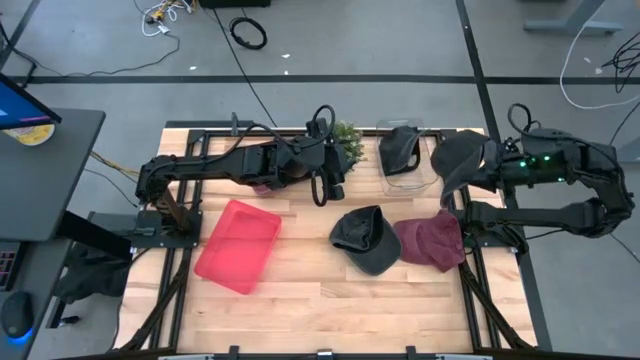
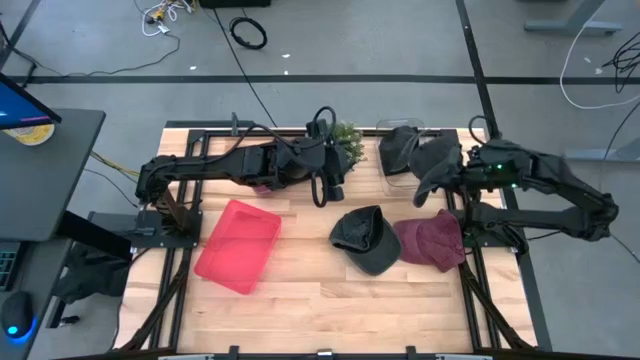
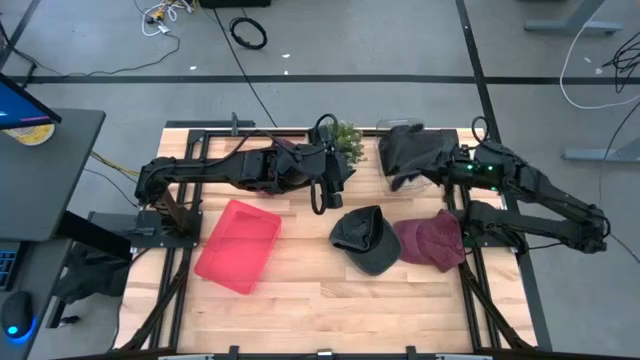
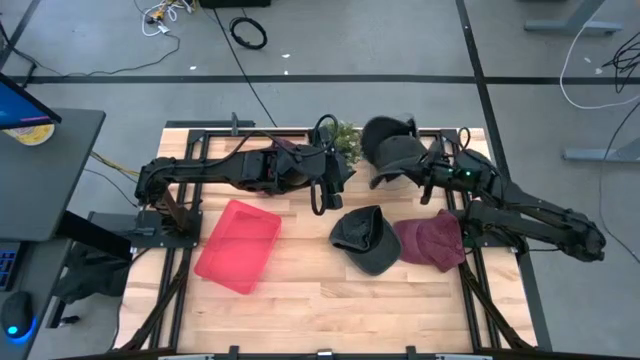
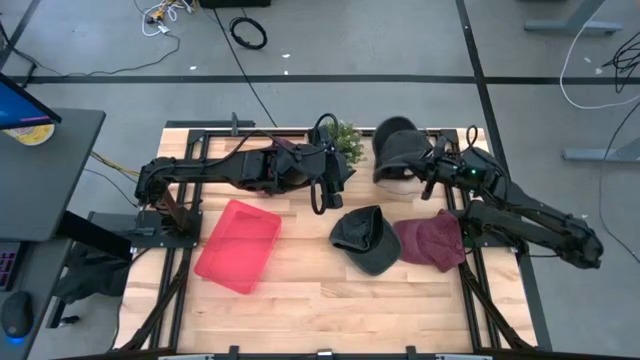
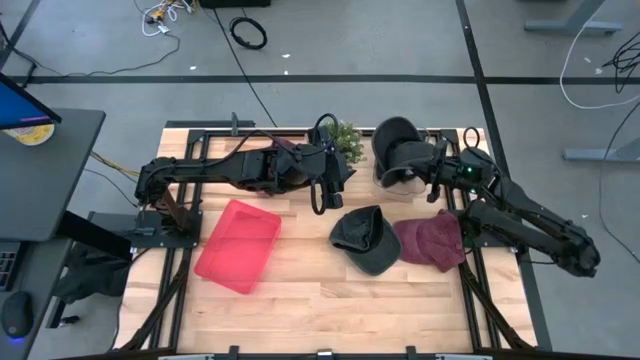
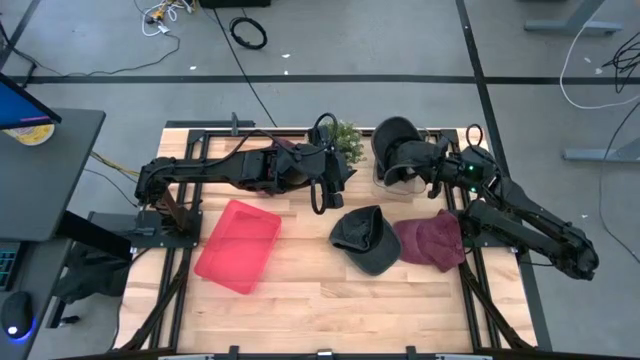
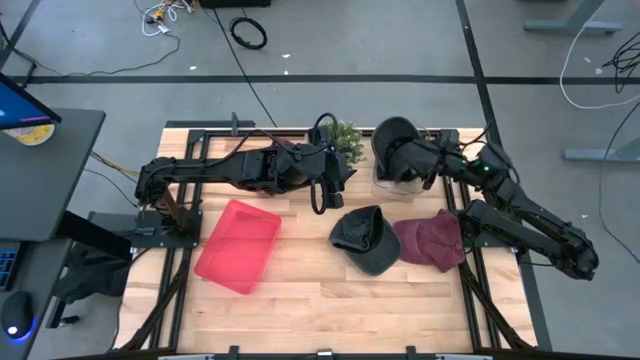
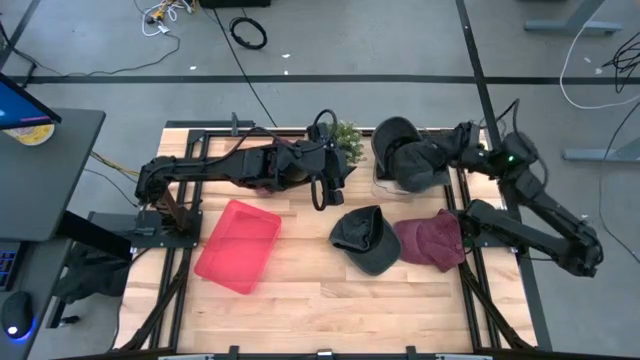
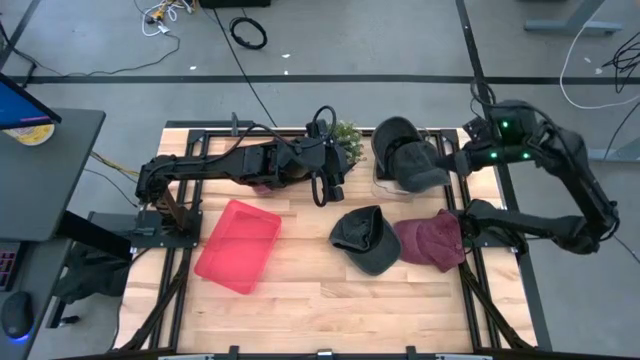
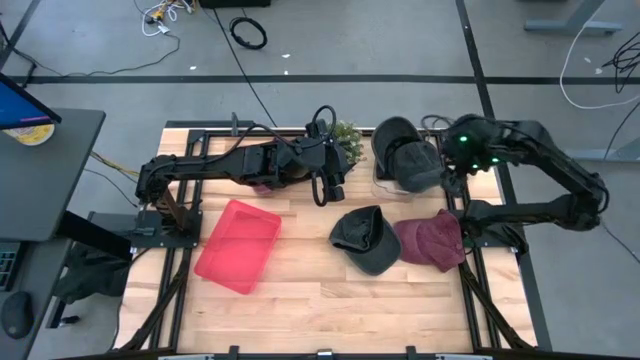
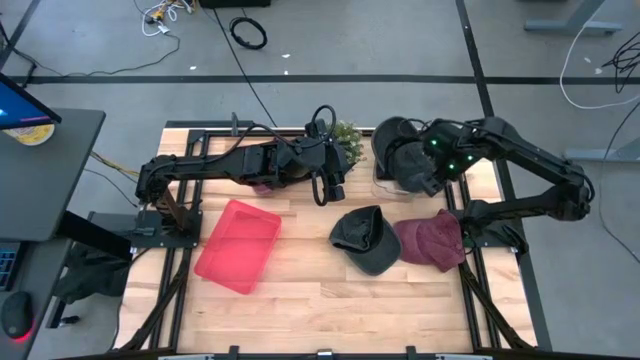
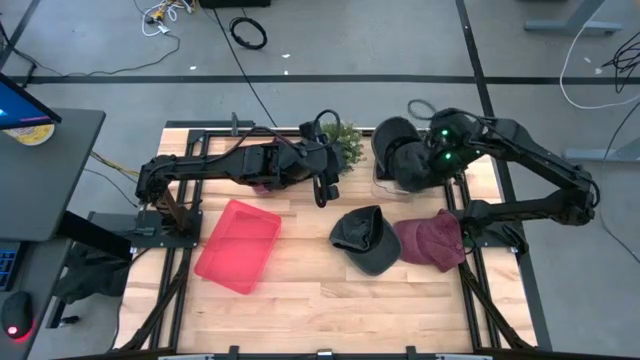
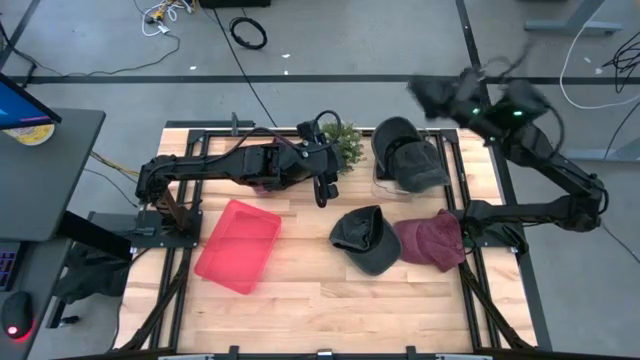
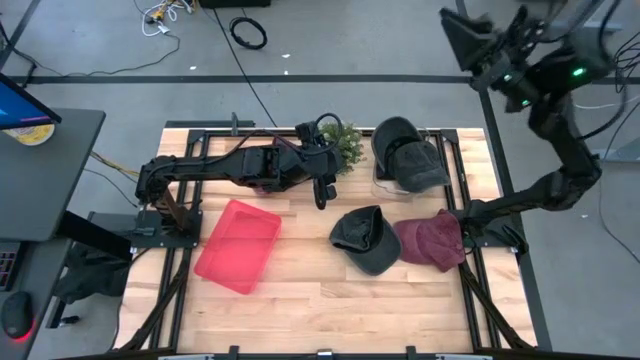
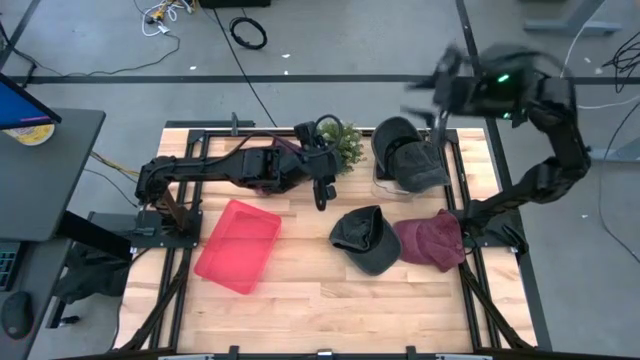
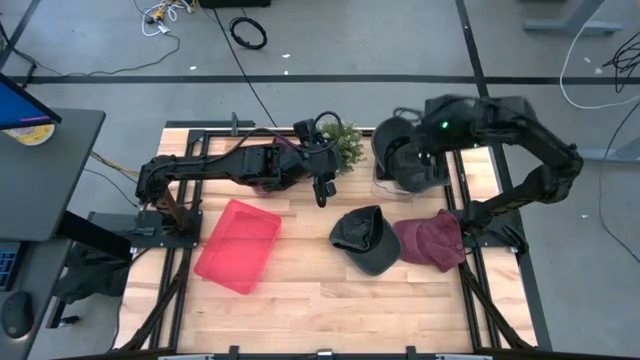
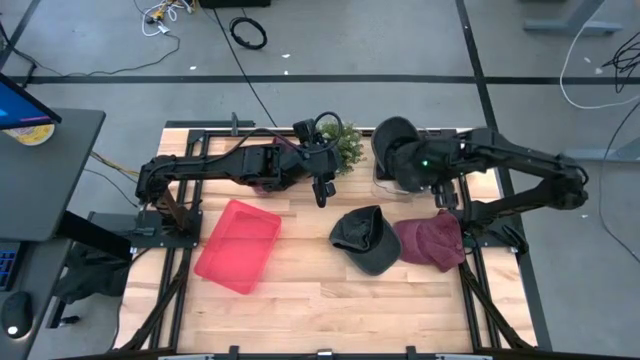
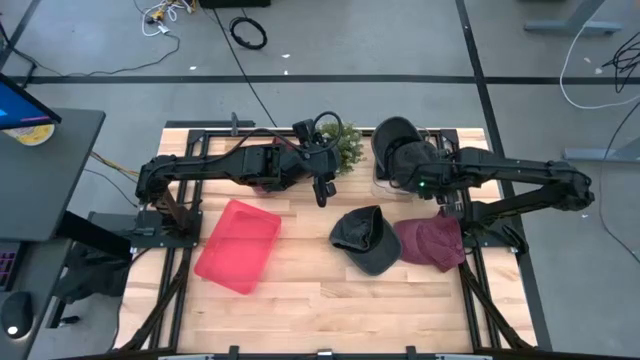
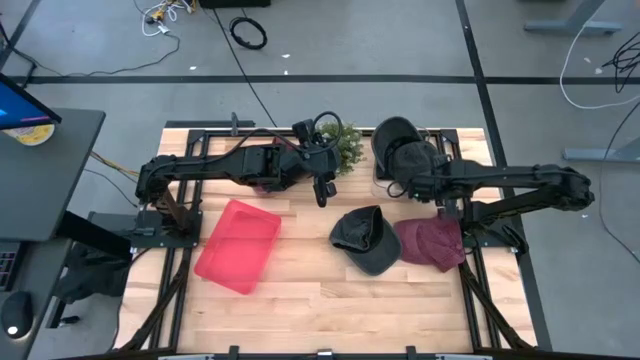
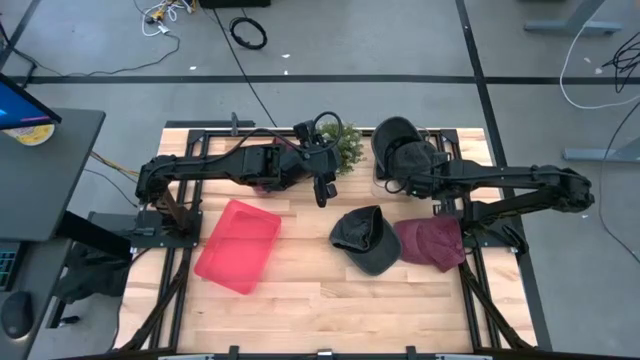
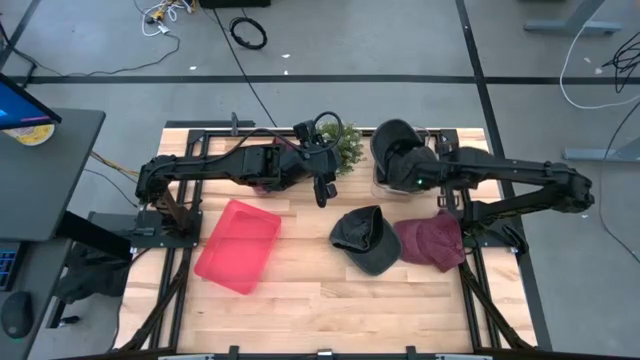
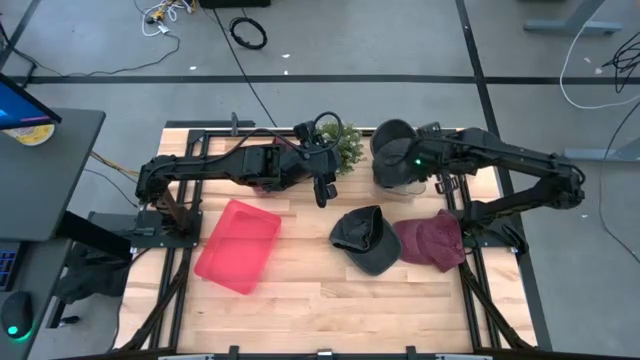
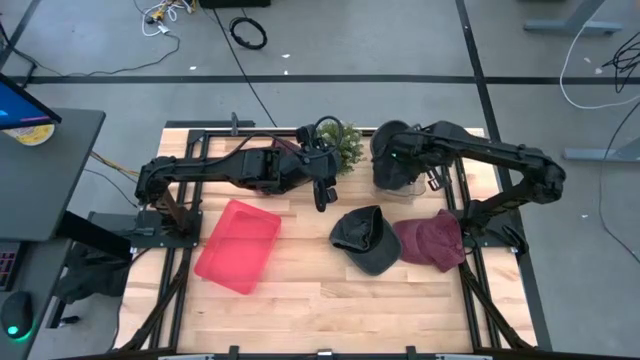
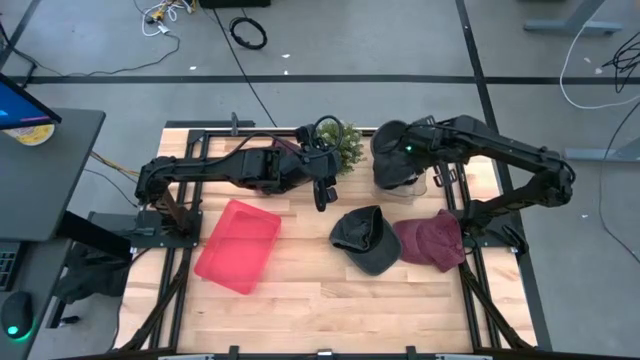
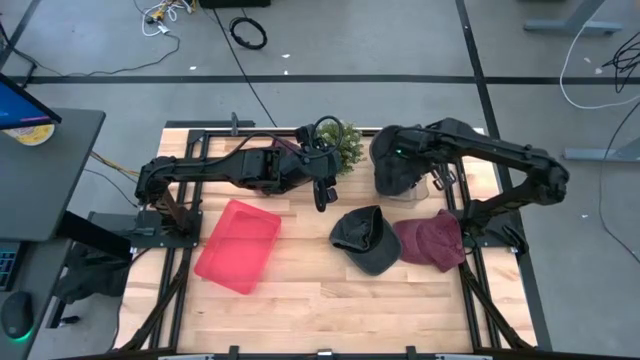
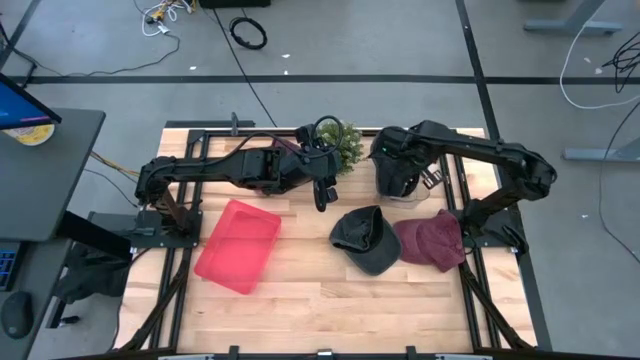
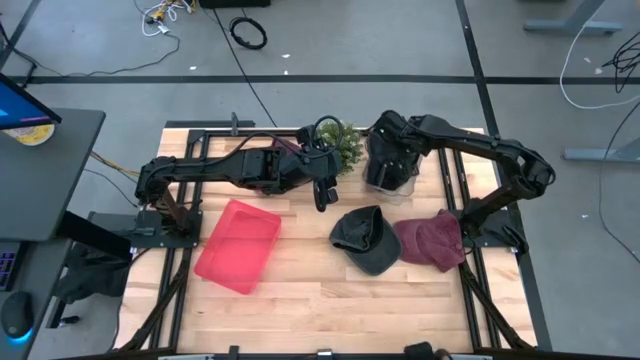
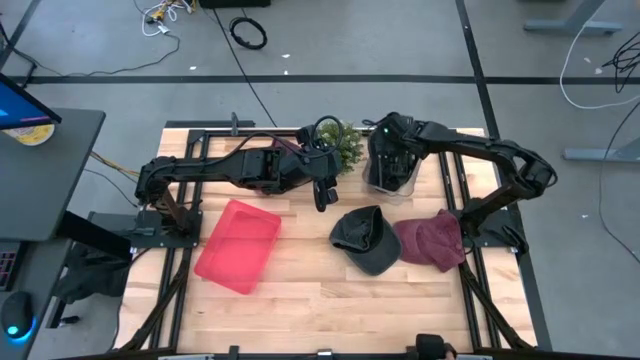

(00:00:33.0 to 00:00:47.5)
Task: Pick & Place hat
Put the bottom black cap into the transparent bin

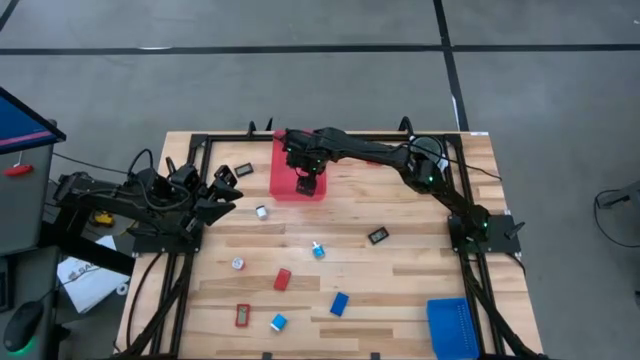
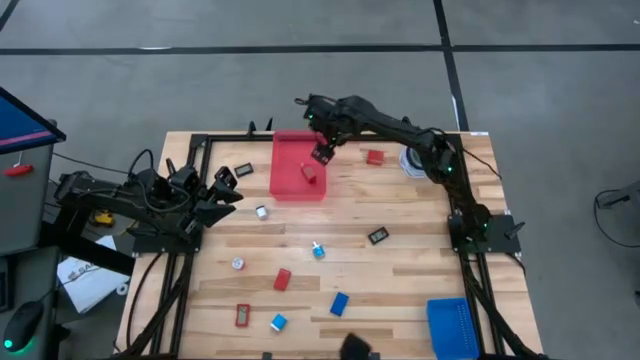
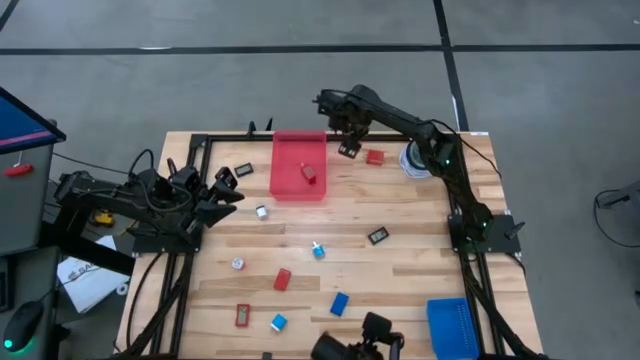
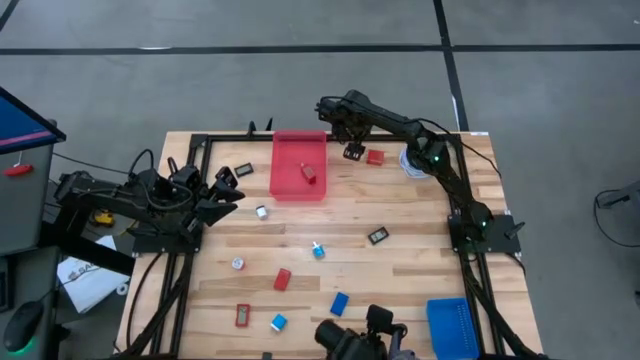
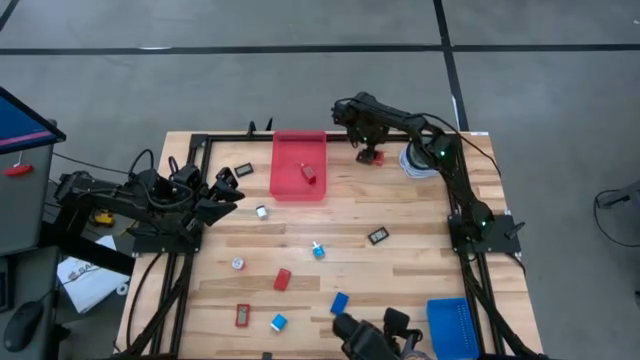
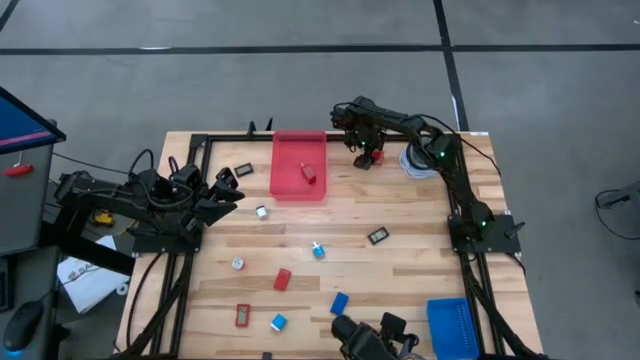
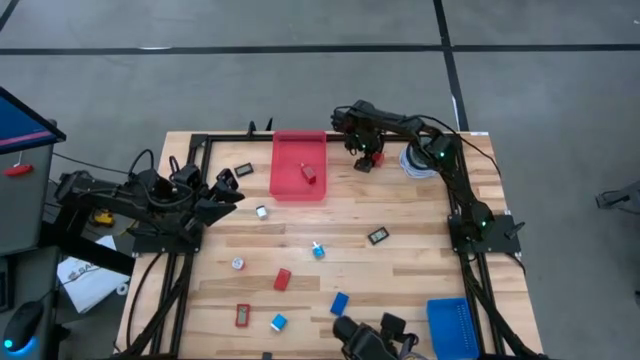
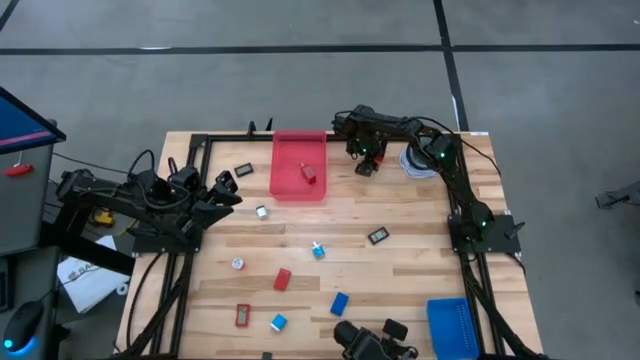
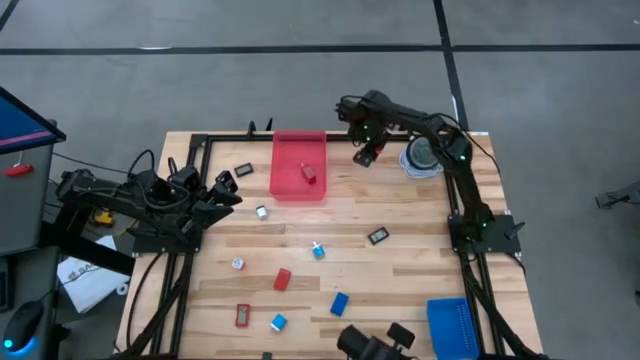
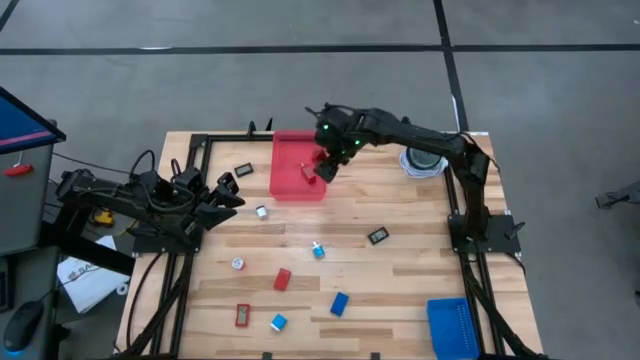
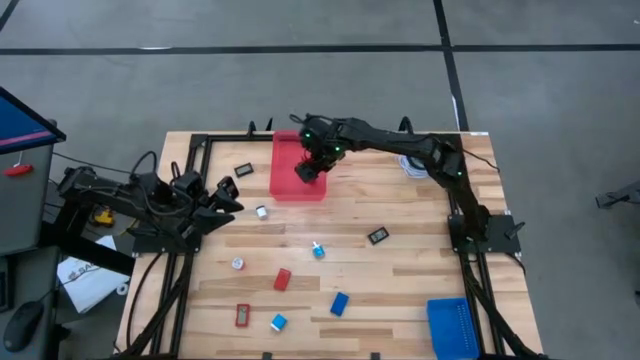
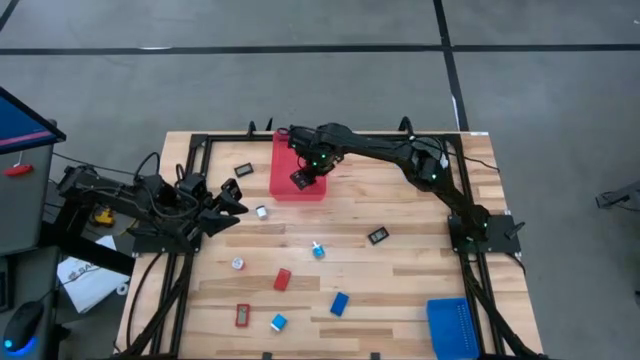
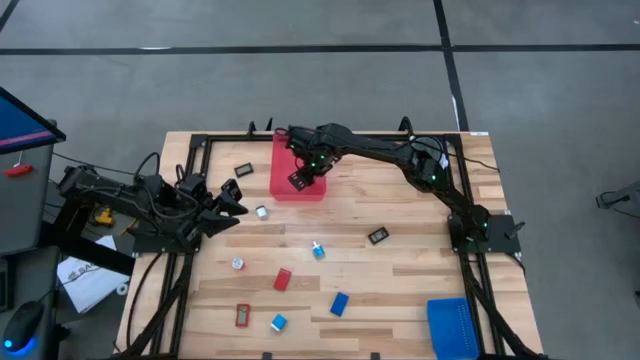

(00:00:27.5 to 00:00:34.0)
Task: Pick & Place Office items
Put the red charger adapter into the red bin
